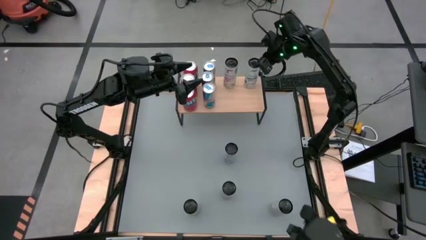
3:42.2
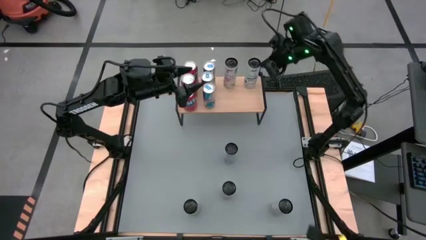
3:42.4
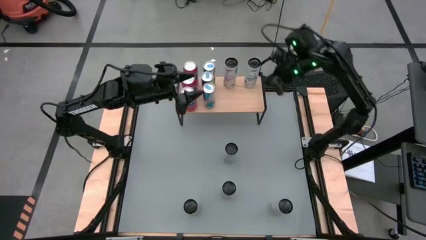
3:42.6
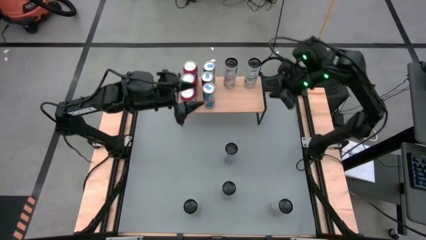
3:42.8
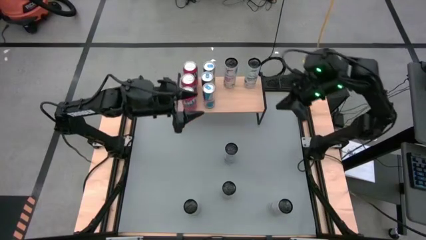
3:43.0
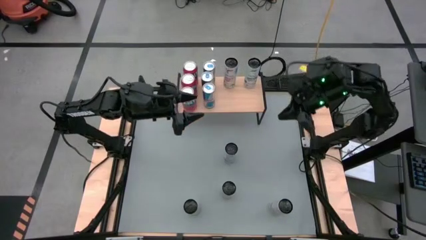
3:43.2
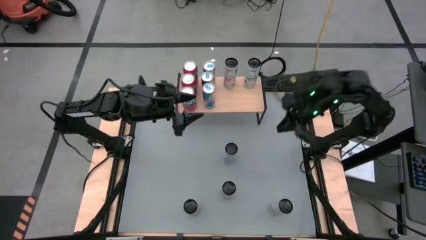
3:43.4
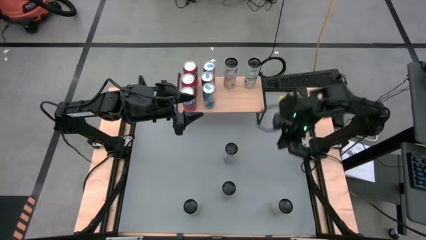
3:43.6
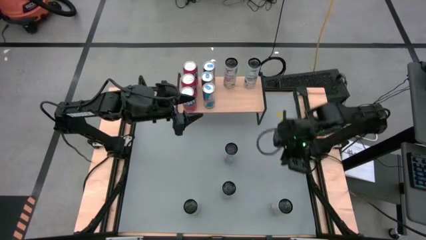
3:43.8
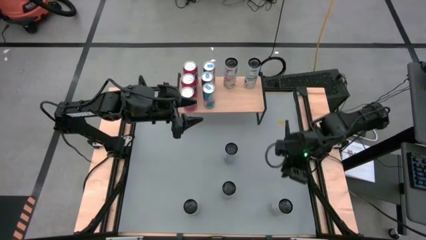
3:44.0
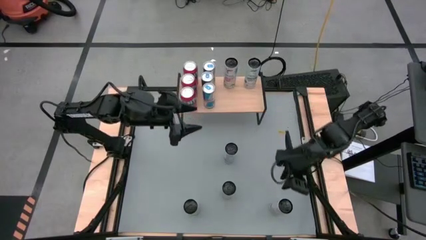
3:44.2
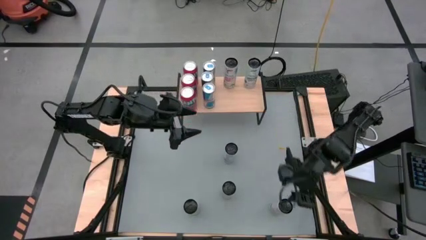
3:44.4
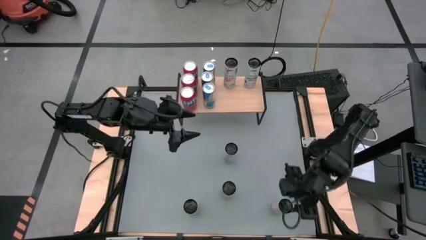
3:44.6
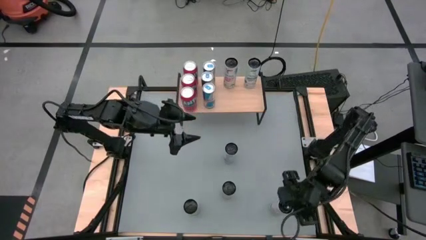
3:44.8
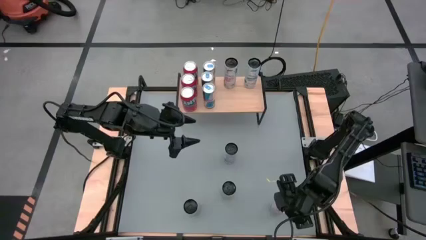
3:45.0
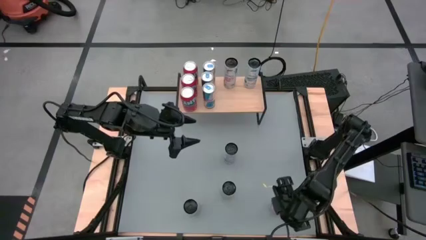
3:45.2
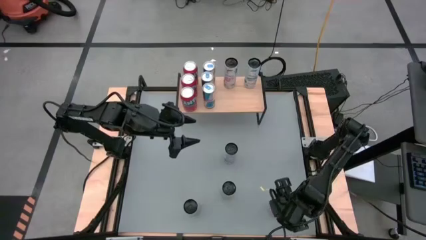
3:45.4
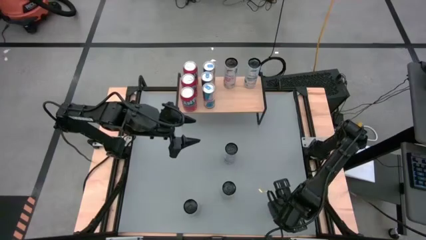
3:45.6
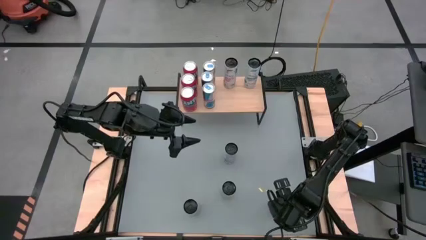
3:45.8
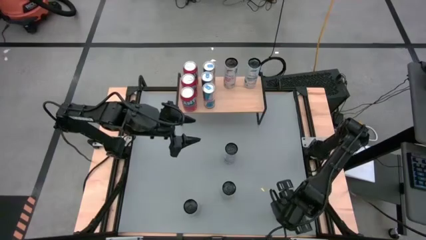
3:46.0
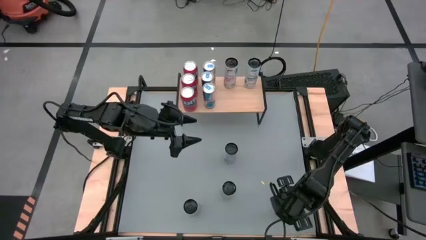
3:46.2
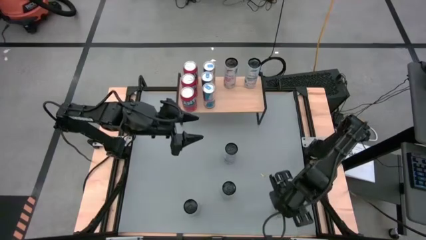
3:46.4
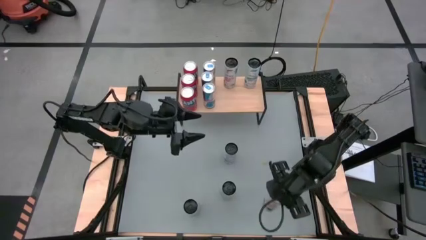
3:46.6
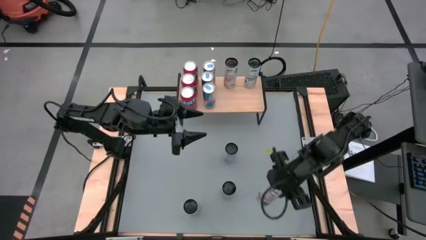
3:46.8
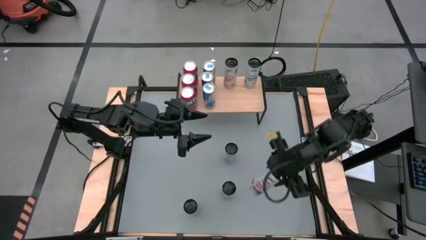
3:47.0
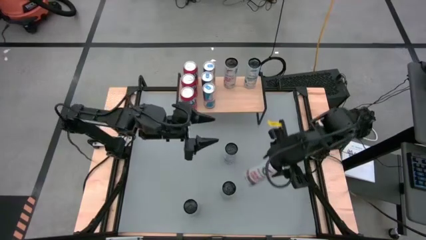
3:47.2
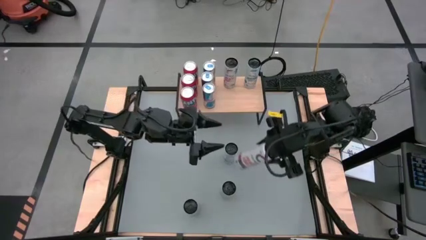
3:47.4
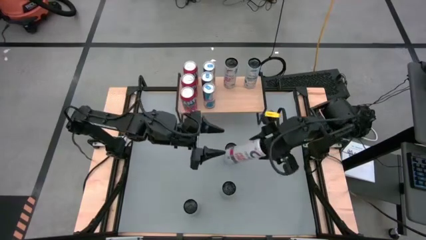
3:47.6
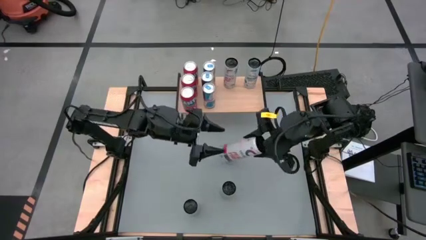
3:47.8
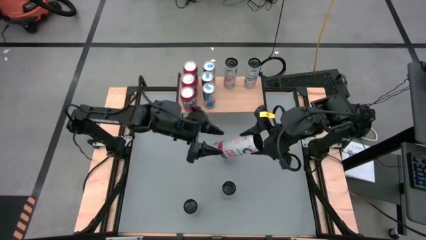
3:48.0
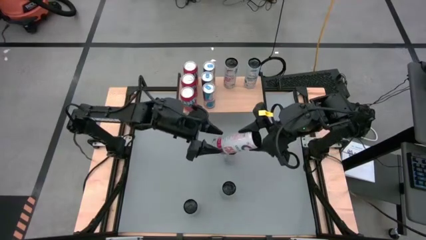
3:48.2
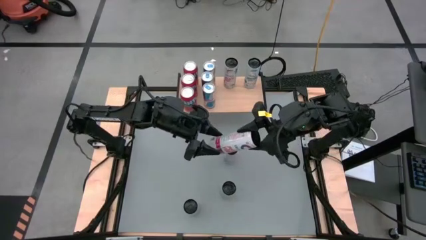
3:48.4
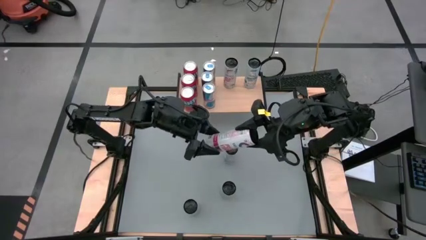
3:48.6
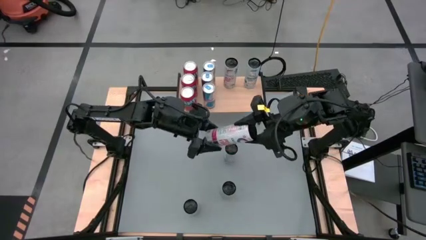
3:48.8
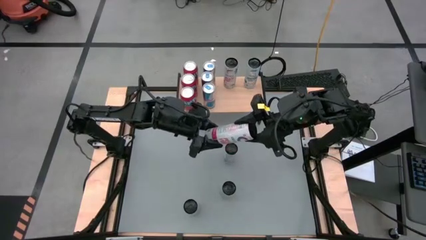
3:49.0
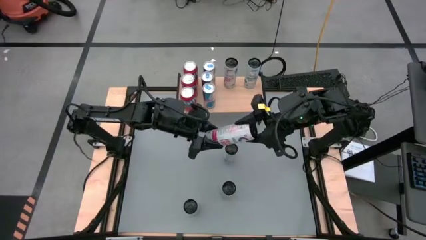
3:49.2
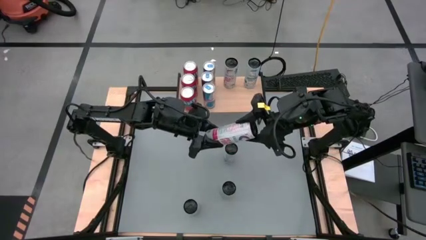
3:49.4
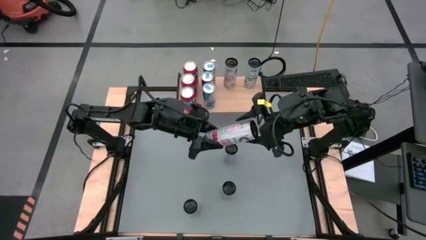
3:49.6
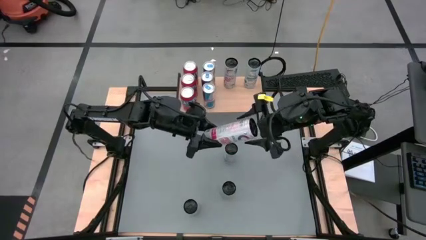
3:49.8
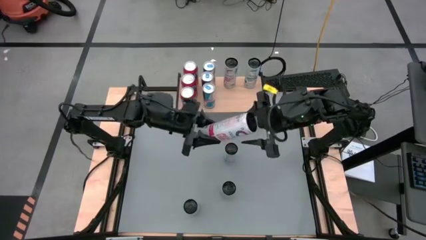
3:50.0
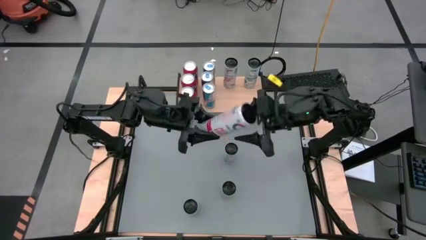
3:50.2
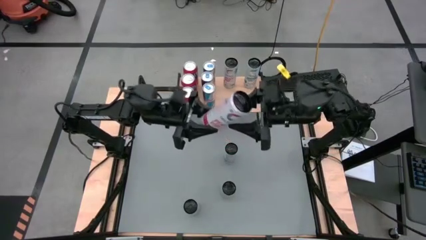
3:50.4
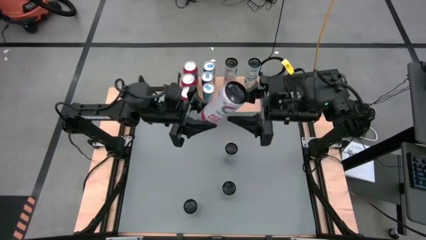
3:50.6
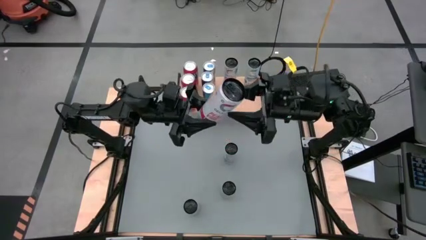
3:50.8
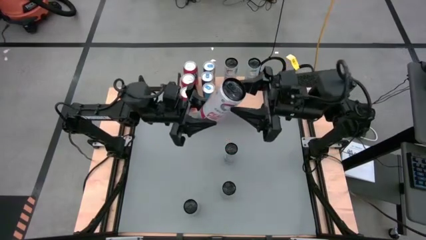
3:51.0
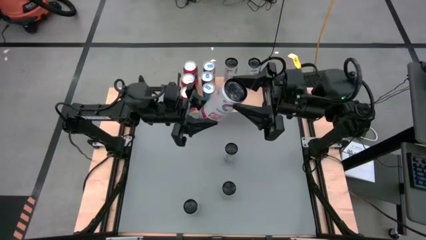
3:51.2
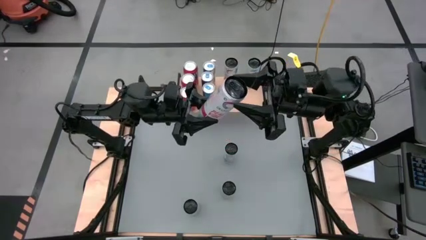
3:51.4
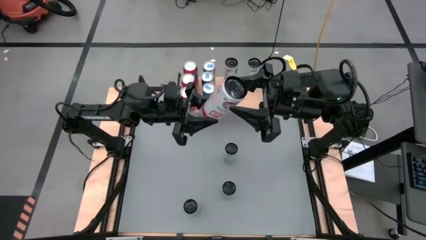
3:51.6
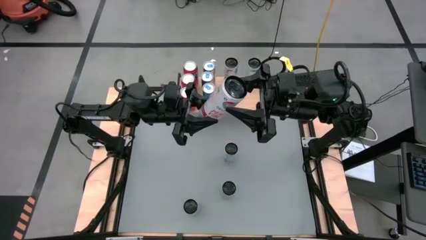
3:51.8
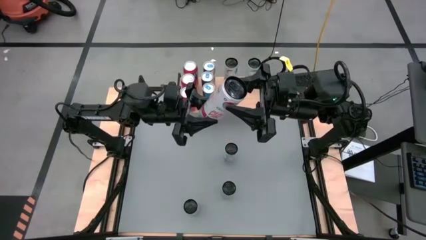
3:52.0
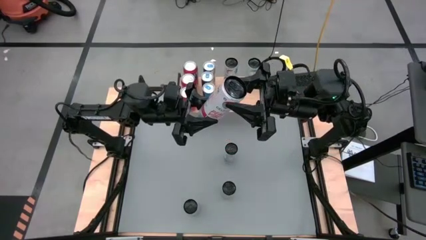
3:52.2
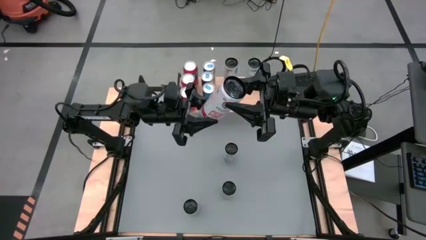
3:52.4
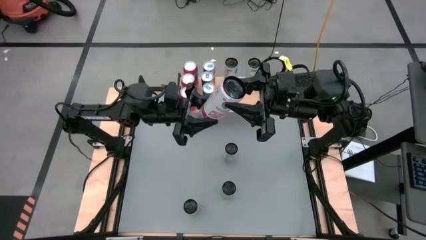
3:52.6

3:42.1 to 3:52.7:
Task: Place canned beverage on shelf
Put the right white-pink soda can on the shelf aligned with the other white-pink soda can

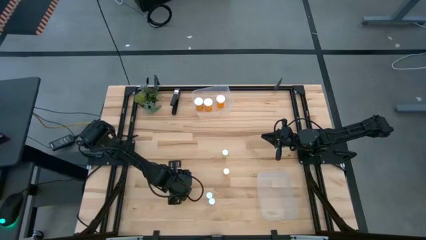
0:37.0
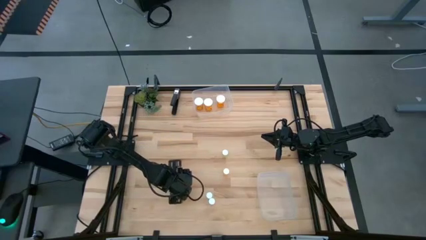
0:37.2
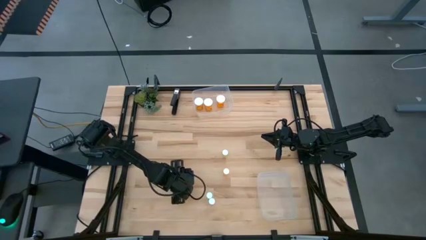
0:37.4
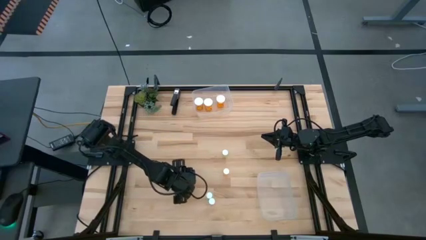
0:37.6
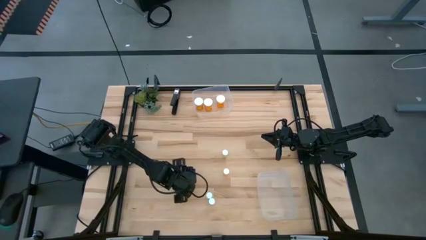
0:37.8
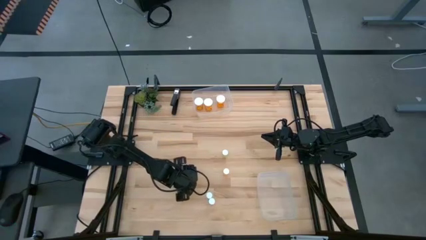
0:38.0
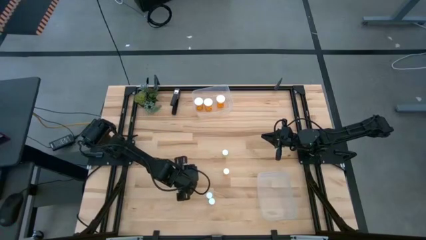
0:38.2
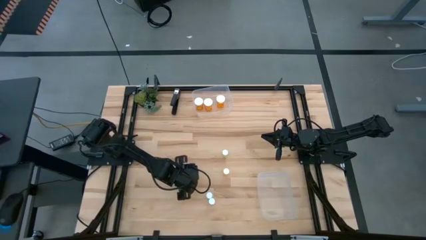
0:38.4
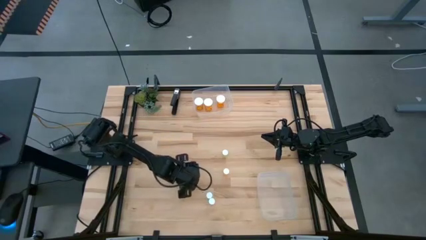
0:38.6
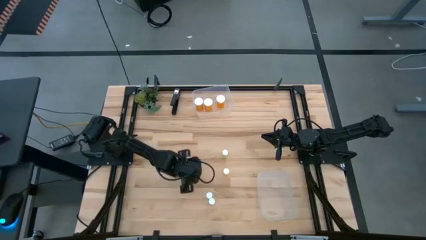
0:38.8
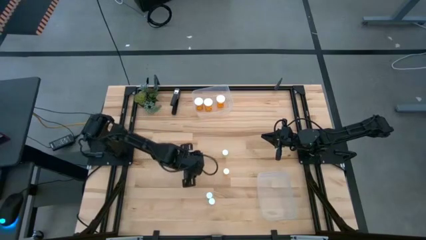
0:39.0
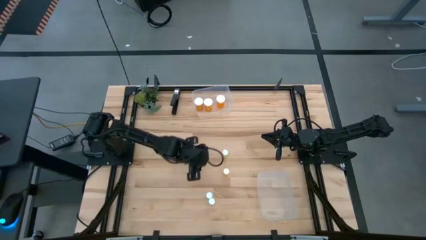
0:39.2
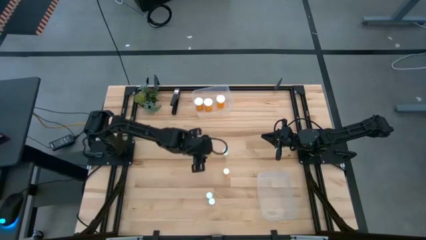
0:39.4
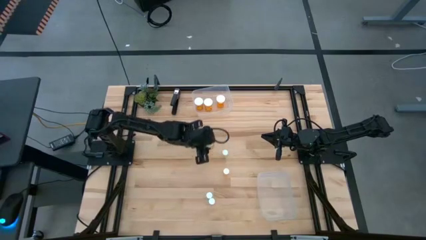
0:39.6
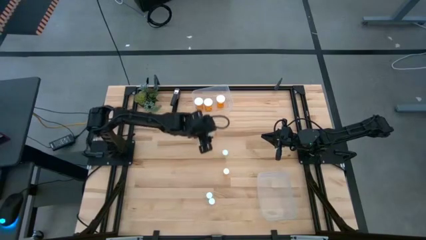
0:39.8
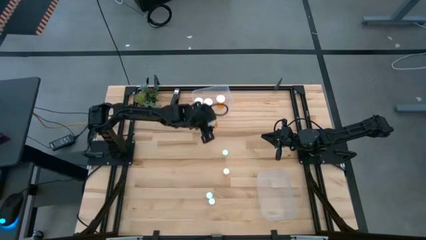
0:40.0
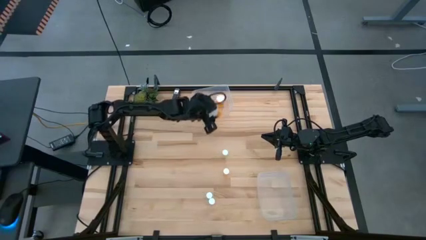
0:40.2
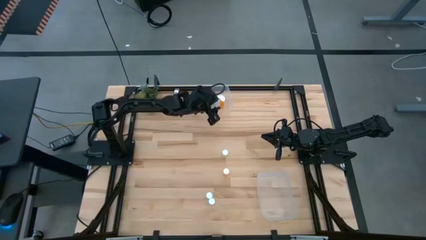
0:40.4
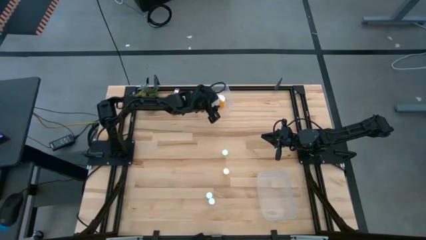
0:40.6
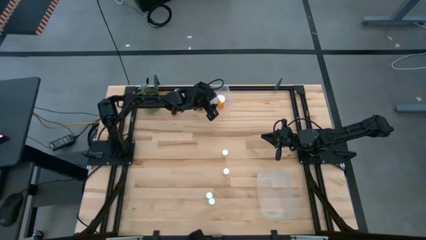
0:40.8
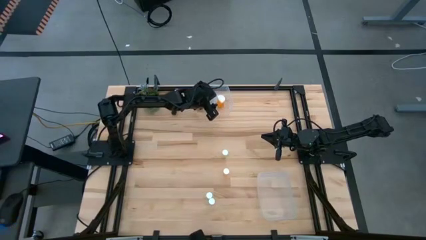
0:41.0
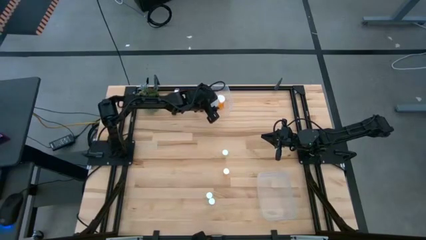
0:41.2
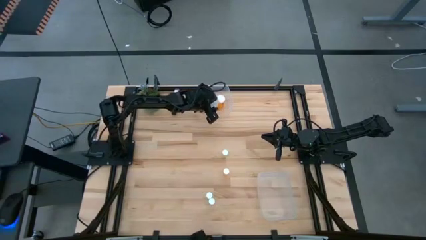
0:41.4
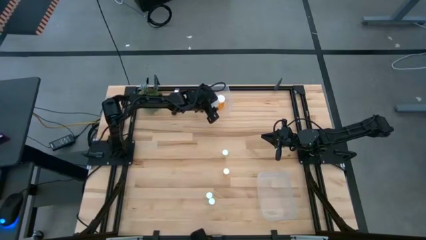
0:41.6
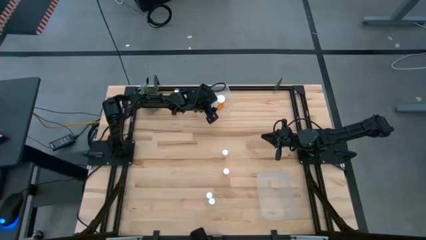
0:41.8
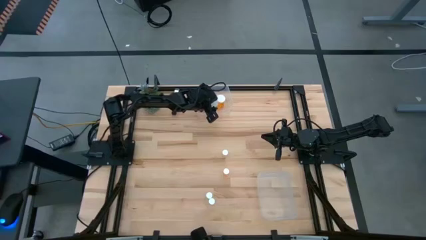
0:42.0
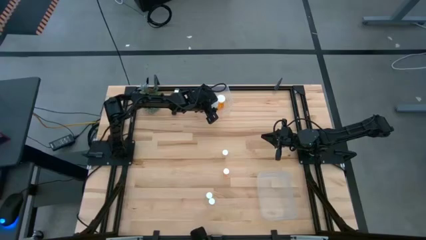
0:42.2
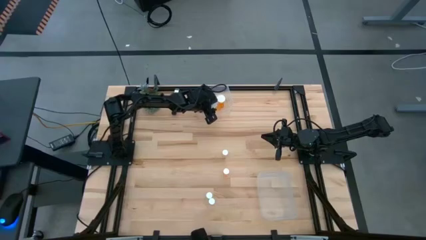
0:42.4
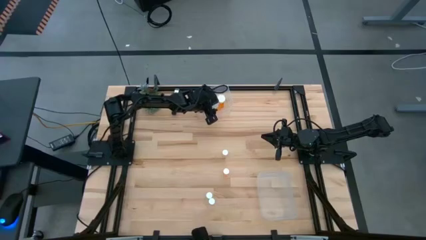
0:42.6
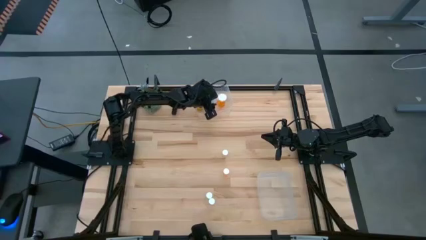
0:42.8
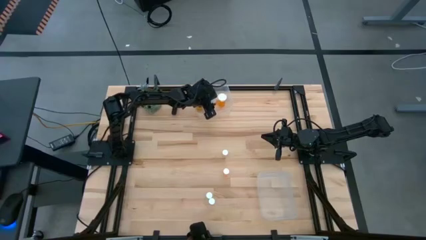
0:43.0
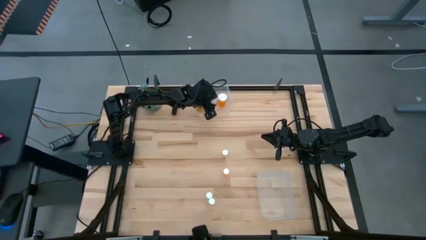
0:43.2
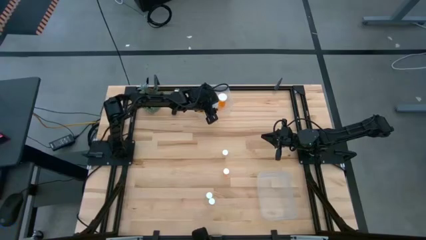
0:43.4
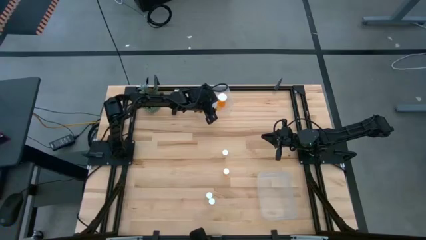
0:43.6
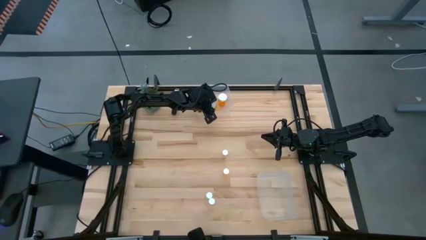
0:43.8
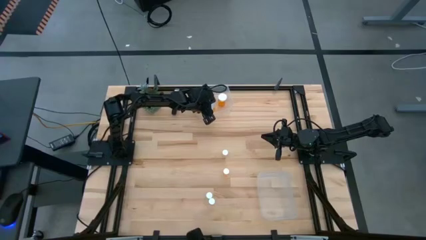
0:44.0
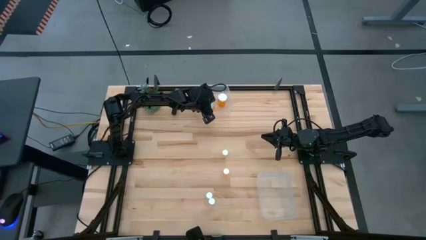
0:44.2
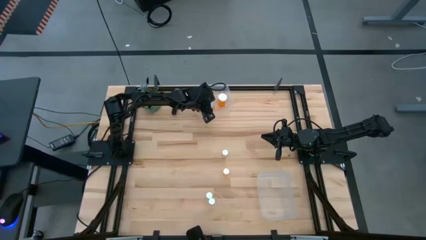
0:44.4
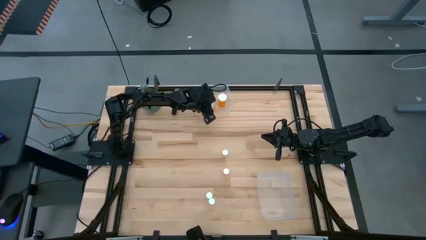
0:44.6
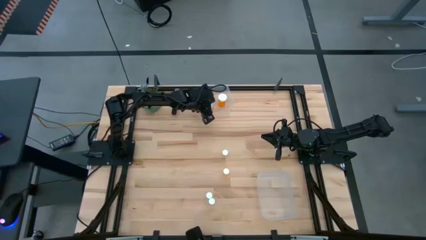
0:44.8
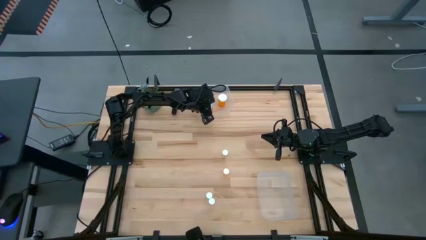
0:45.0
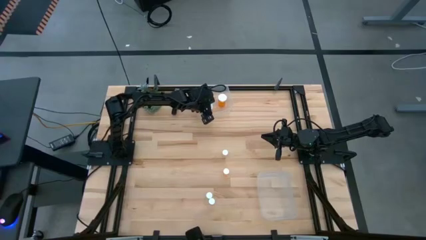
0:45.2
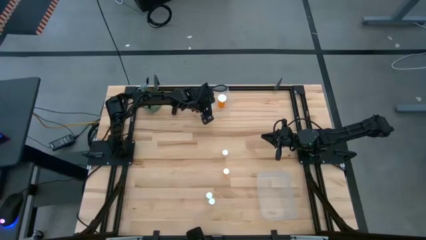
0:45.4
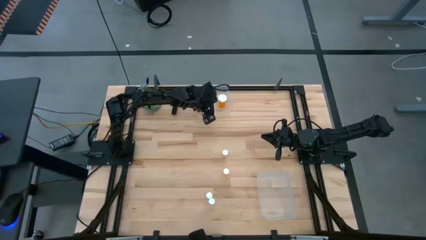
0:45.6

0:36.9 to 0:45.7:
Task: Pick and place medicine bottles into bin by pill shape (circle, oval)
Put the big orange pill bottle into the top transparent bin
